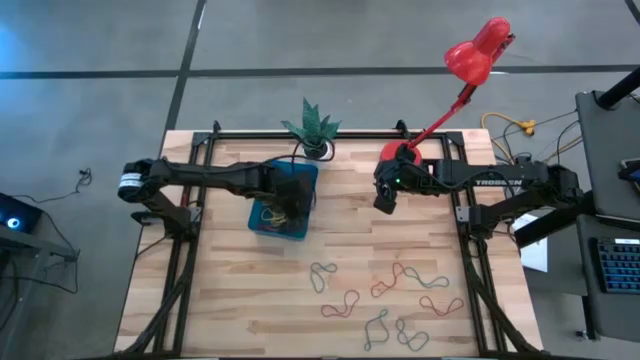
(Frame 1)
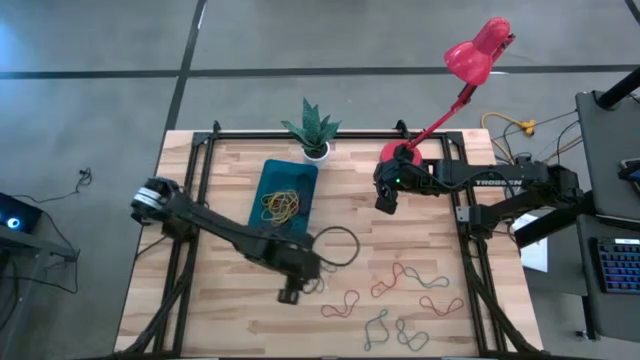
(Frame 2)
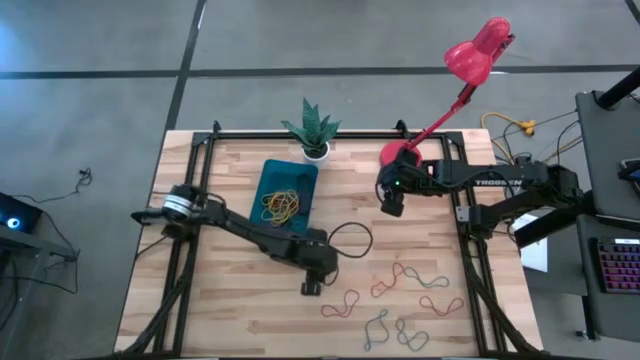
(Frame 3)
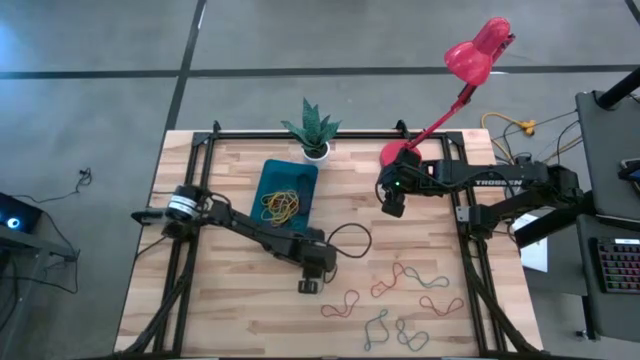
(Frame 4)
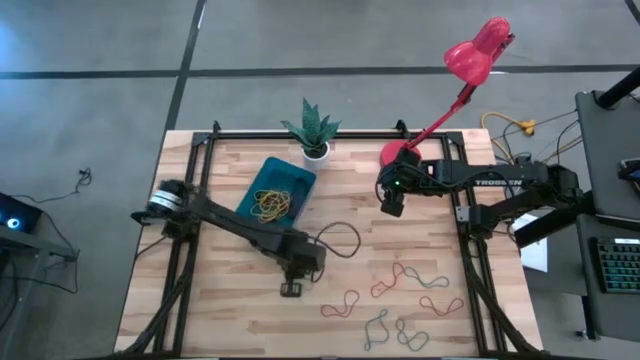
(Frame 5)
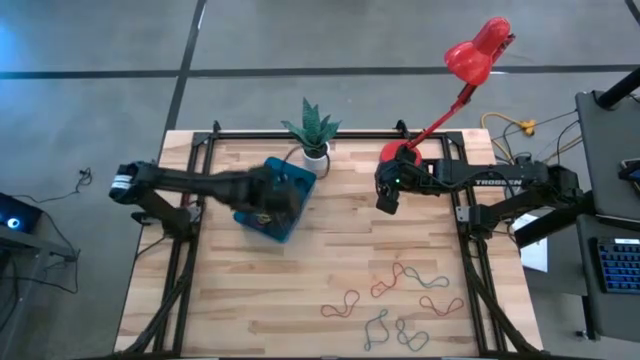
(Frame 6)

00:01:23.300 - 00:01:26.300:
Task: Pick and place rubber bands into bin
Put the blue rubber band into the blue bin

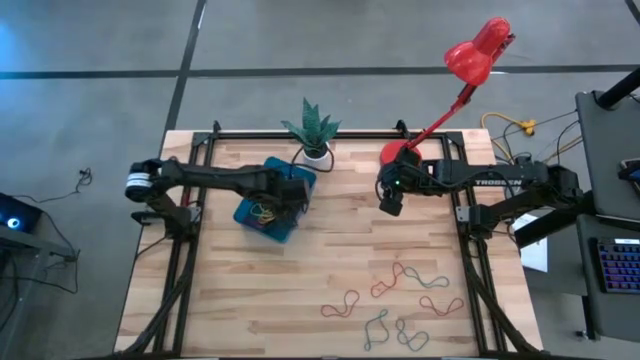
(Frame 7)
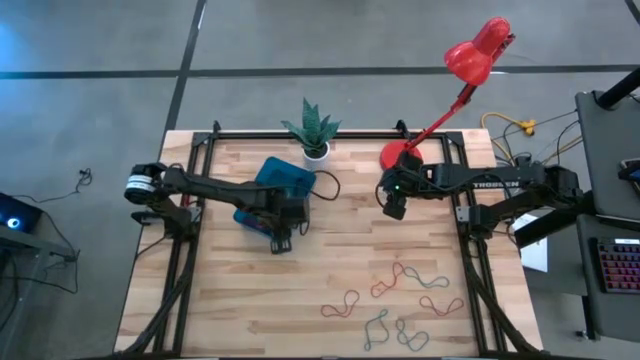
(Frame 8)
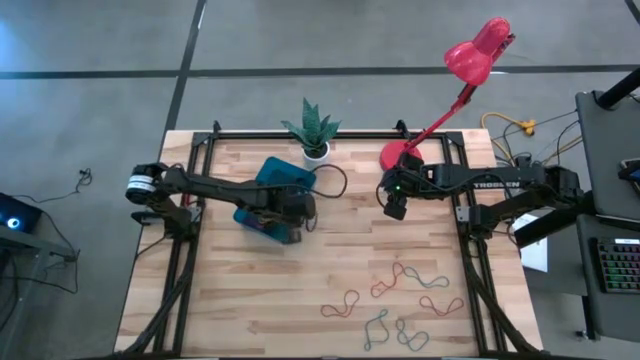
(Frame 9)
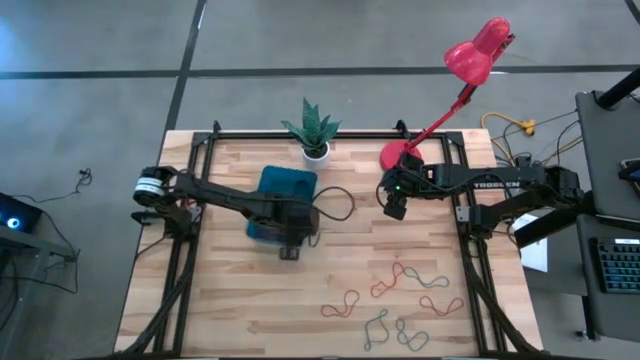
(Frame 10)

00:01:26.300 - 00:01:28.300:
Adjust the blue bin

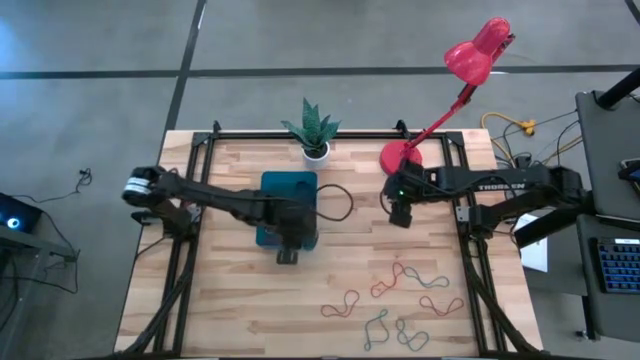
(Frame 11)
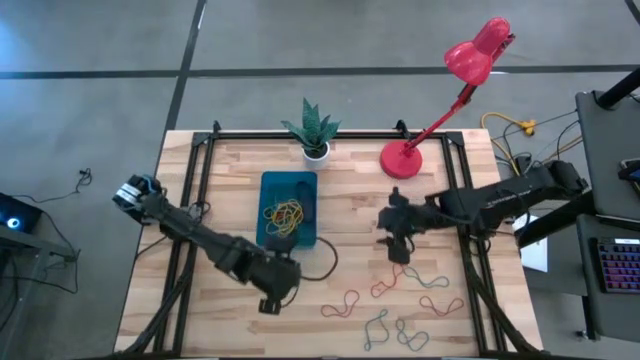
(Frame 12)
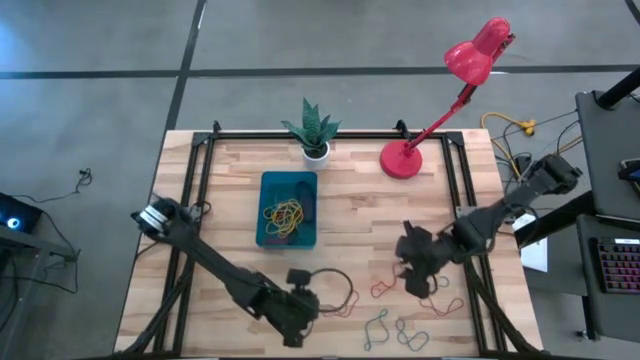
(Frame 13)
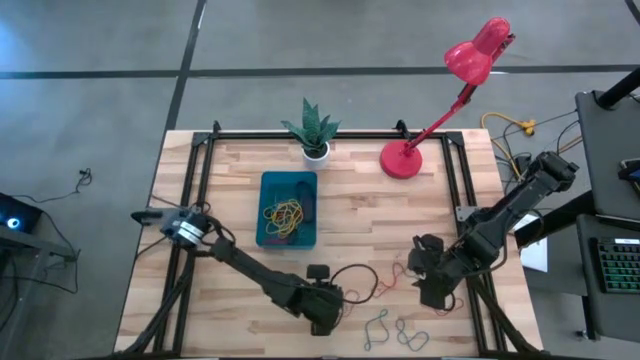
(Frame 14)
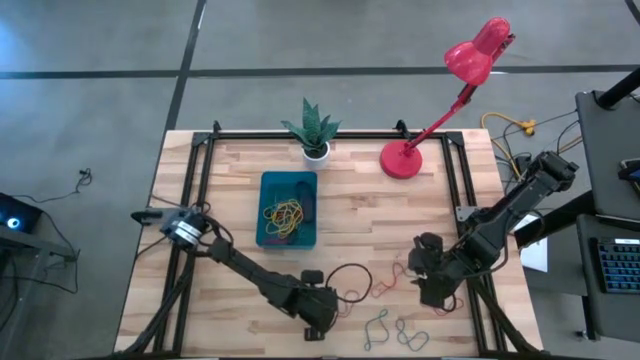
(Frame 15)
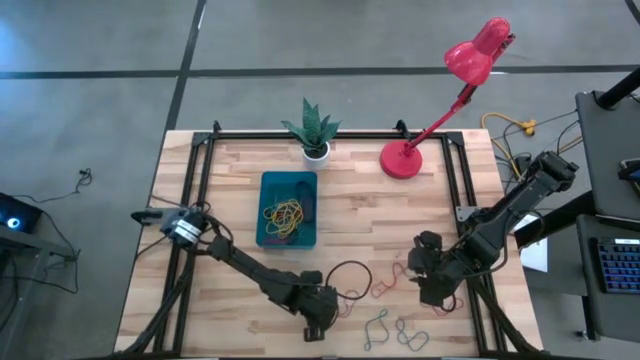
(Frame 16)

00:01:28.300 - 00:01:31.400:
Put the orange rubber band into the blue bin

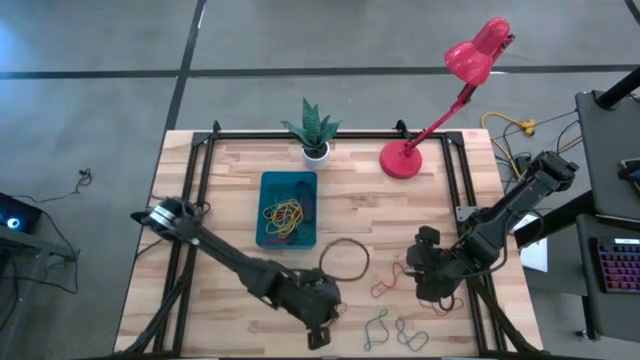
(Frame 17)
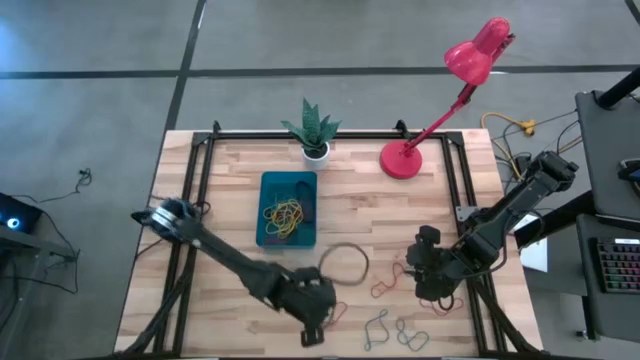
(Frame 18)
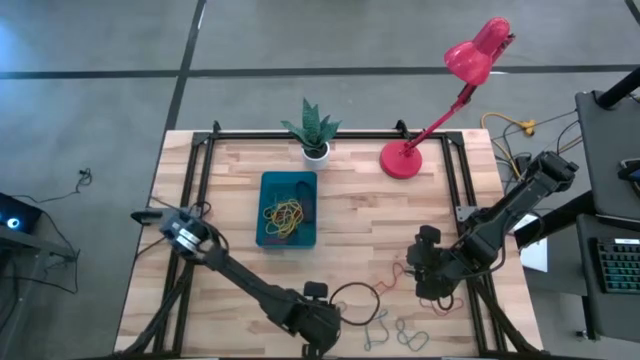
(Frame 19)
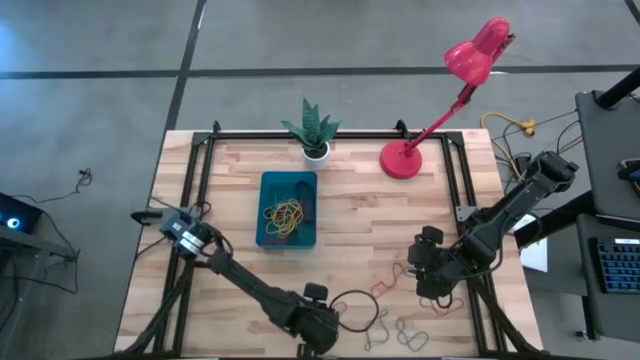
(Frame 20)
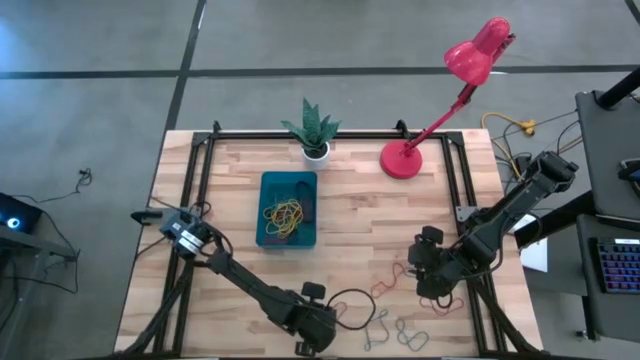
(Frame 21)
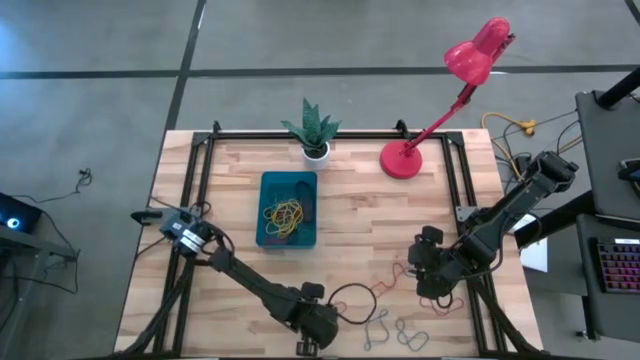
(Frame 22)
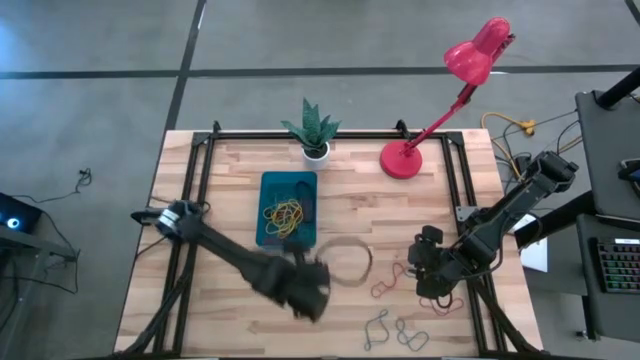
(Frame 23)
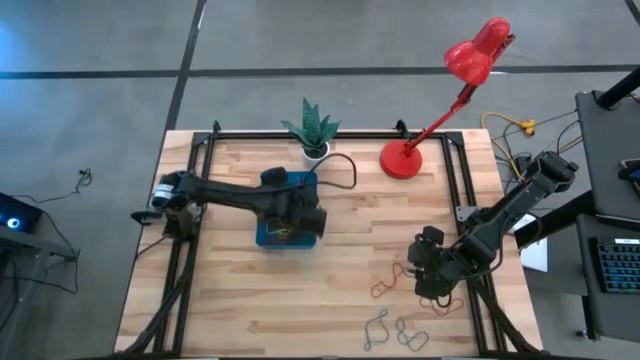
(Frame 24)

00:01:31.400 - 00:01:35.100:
Put the orange rubber band into the blue bin

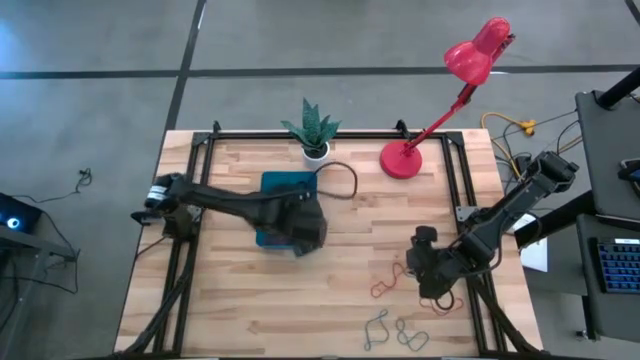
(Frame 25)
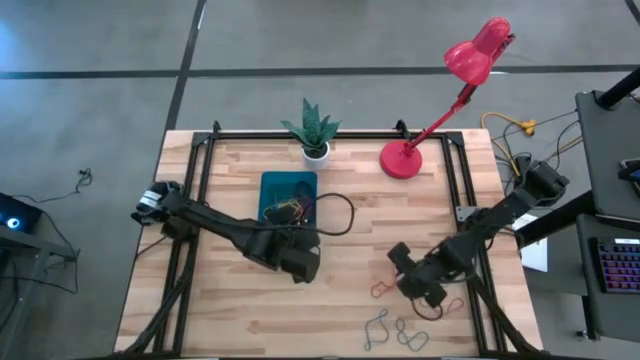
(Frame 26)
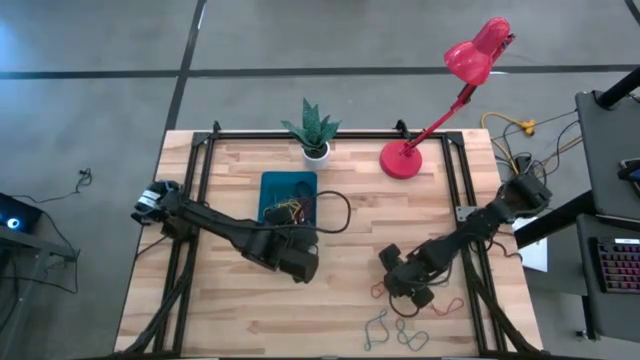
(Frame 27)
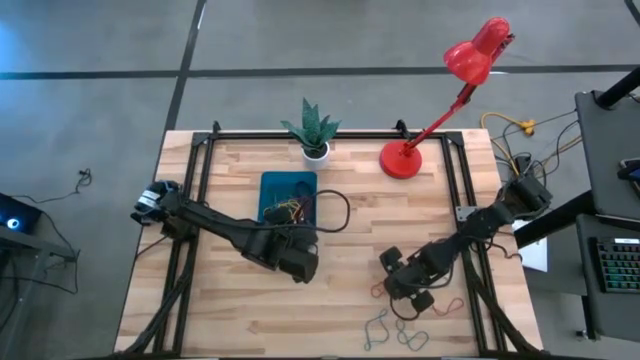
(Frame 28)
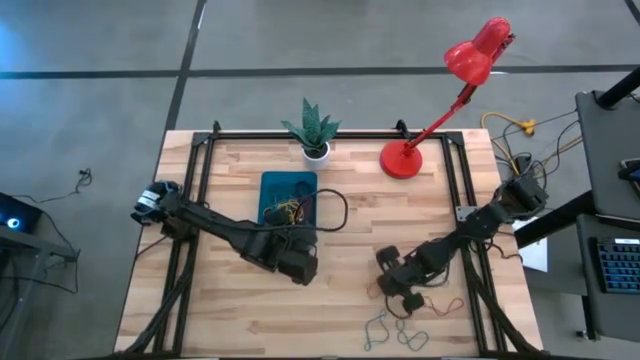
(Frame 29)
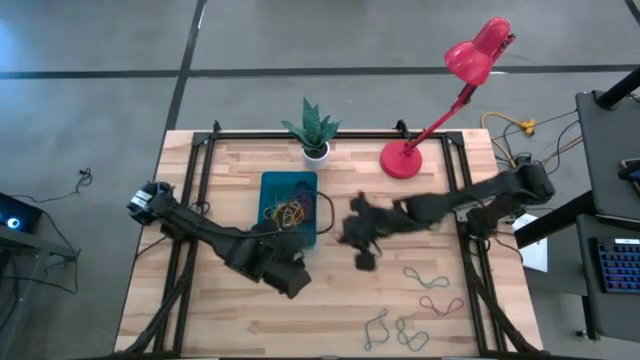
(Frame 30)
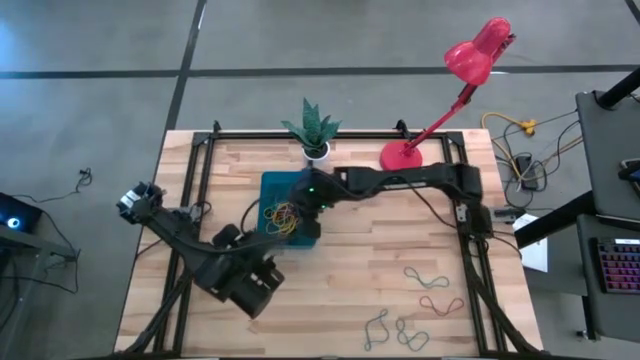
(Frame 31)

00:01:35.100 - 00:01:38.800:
Put the orange rubber band into the blue bin

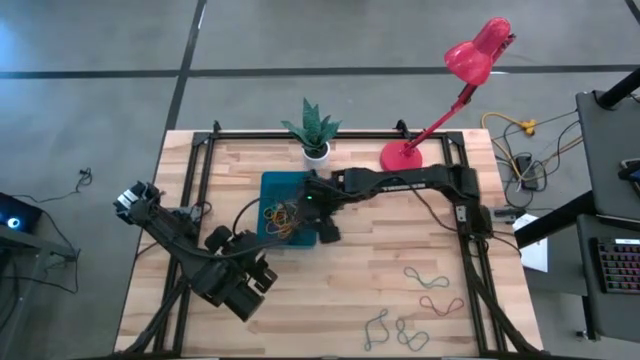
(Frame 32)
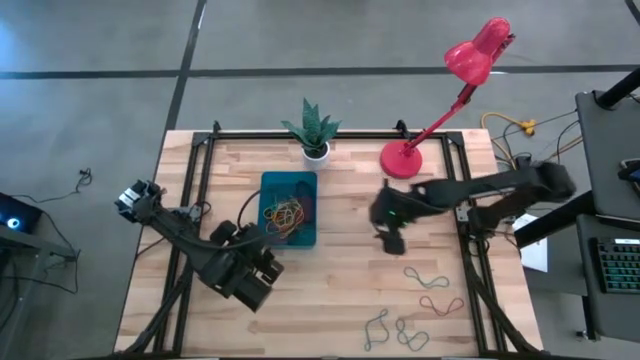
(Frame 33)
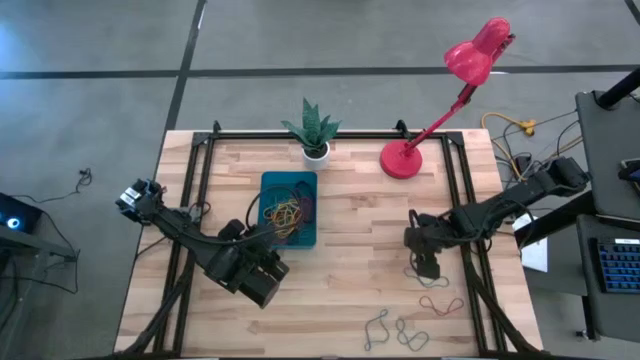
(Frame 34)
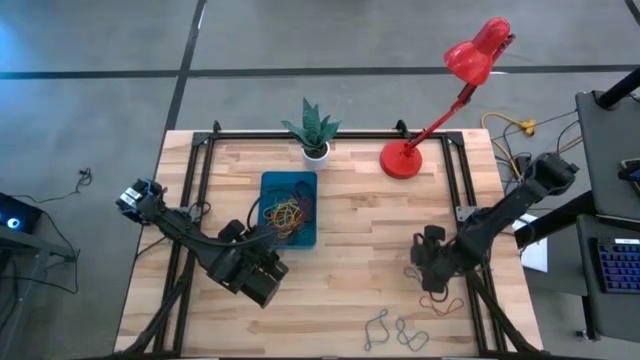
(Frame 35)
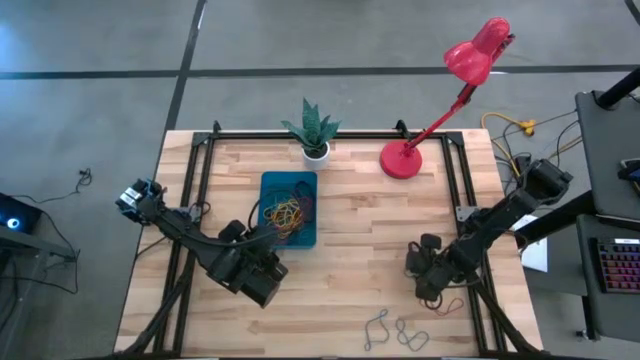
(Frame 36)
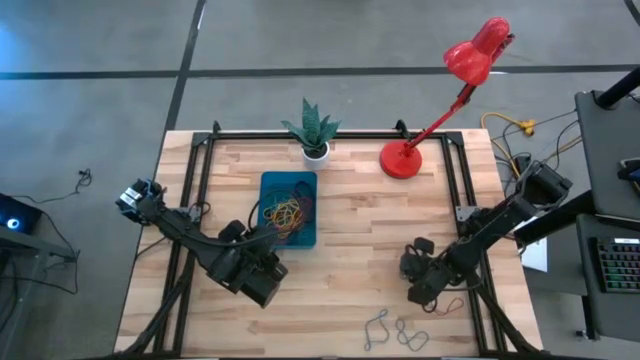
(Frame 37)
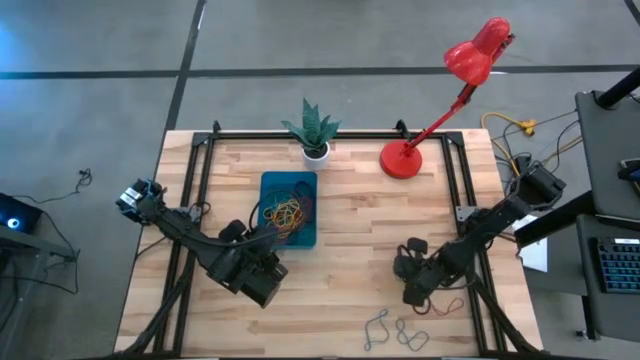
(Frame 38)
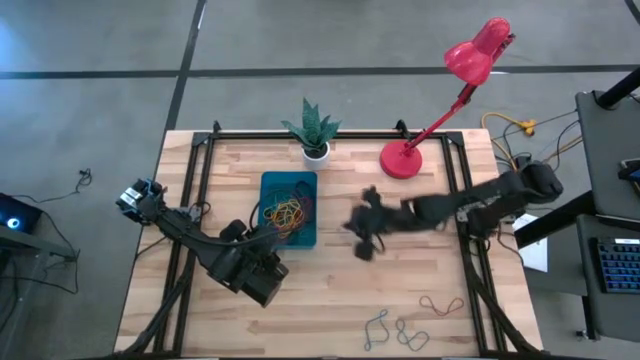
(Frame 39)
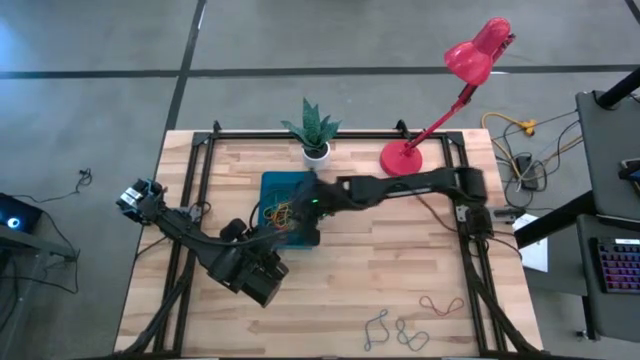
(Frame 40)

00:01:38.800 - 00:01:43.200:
Put the blue rubber band into the blue bin

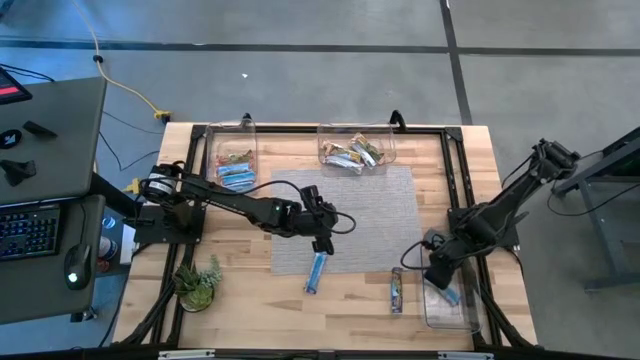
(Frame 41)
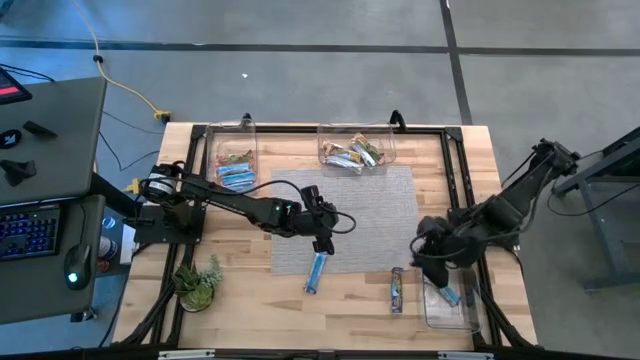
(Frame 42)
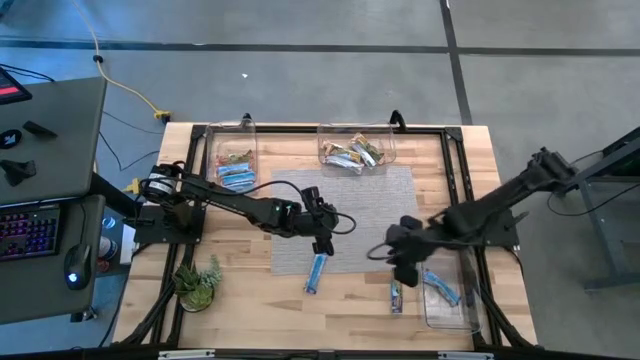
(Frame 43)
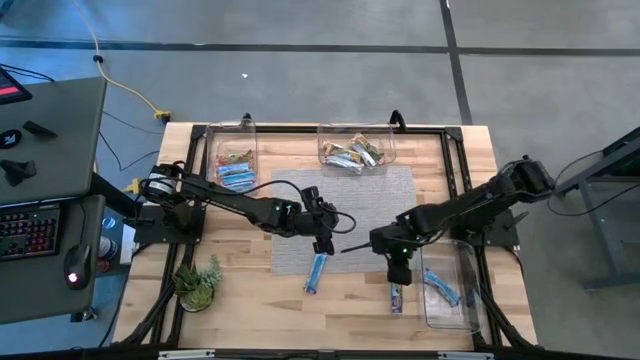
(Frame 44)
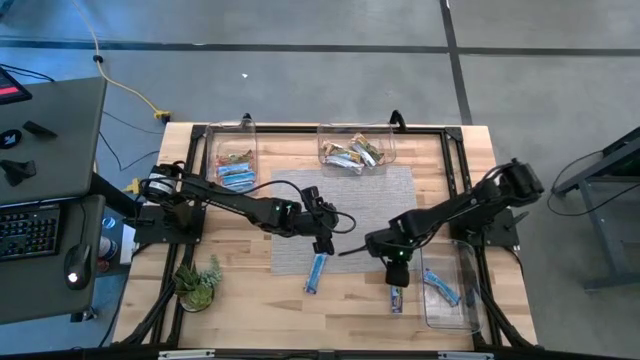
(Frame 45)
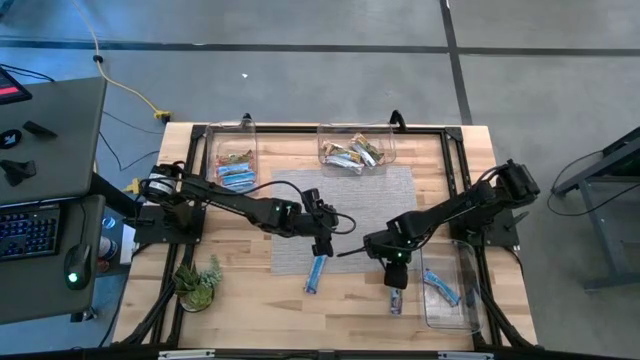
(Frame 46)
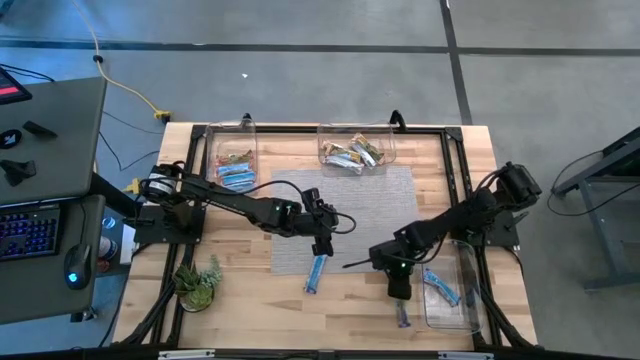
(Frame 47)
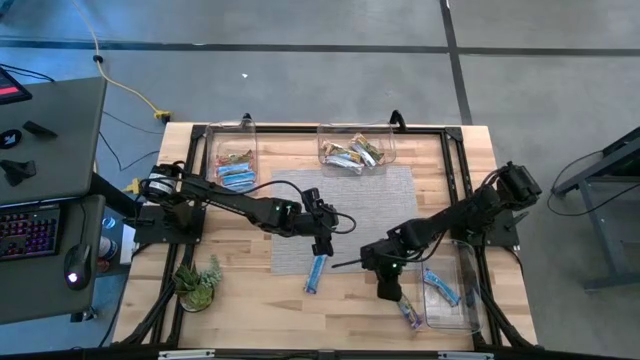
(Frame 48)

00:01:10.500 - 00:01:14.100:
Task: Pick and place Granola Bars by type
Put the blue granola bar into the bottom transparent bin
